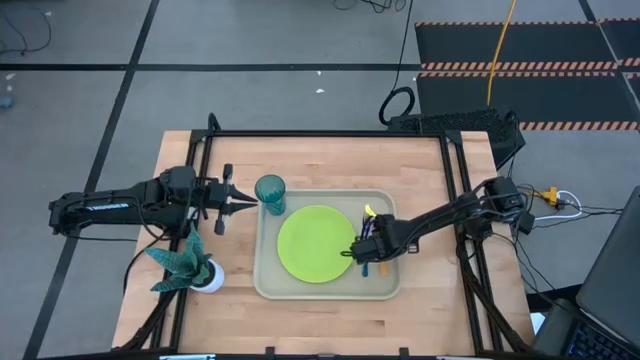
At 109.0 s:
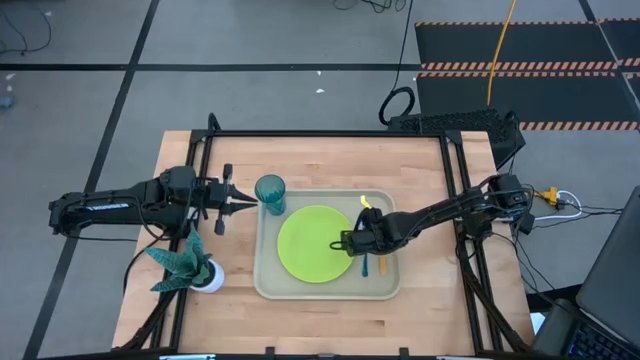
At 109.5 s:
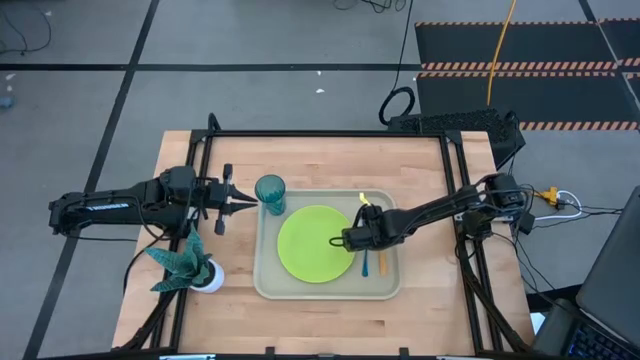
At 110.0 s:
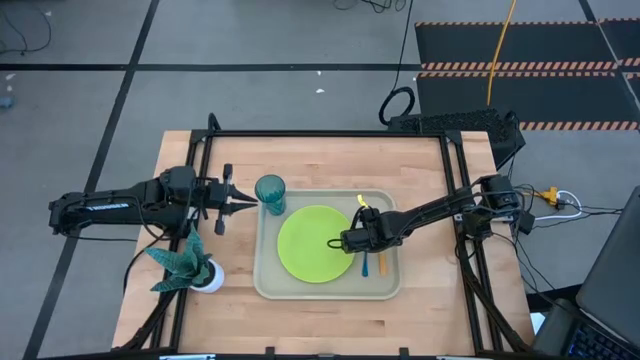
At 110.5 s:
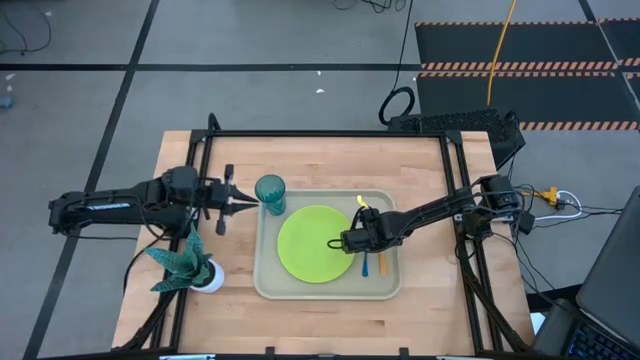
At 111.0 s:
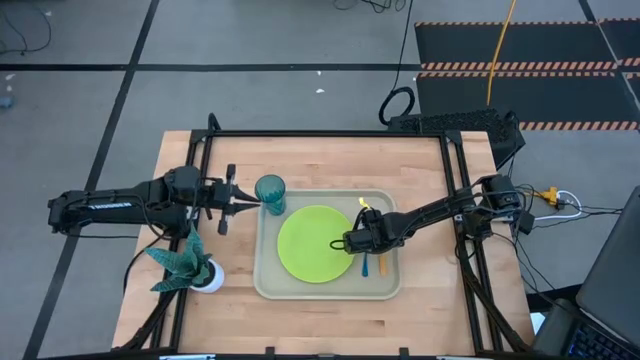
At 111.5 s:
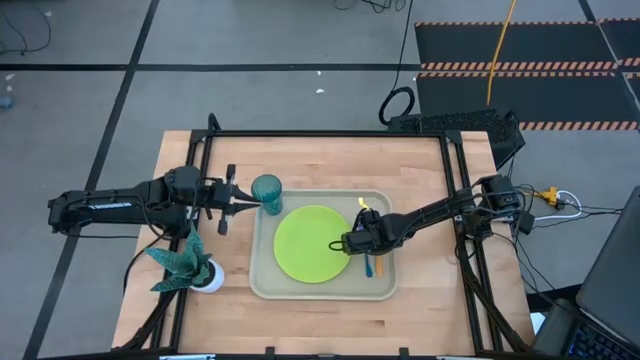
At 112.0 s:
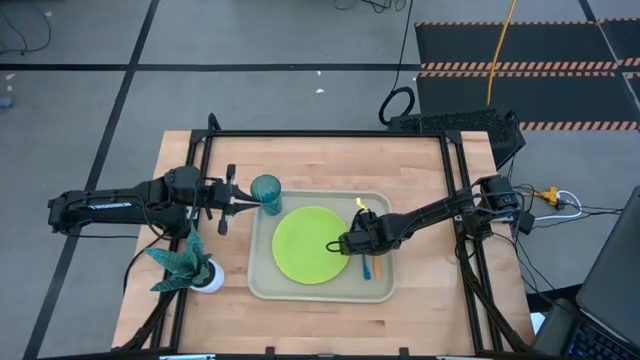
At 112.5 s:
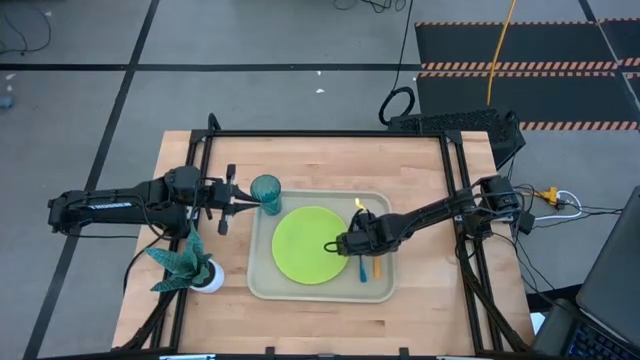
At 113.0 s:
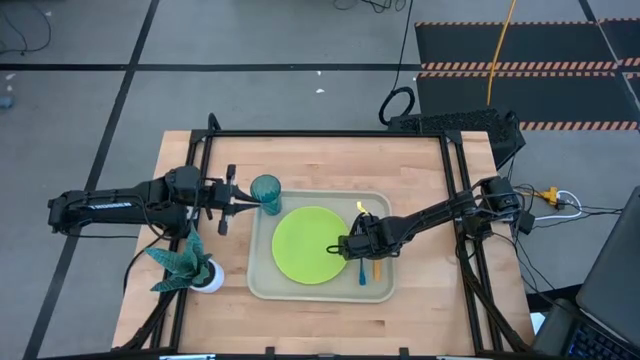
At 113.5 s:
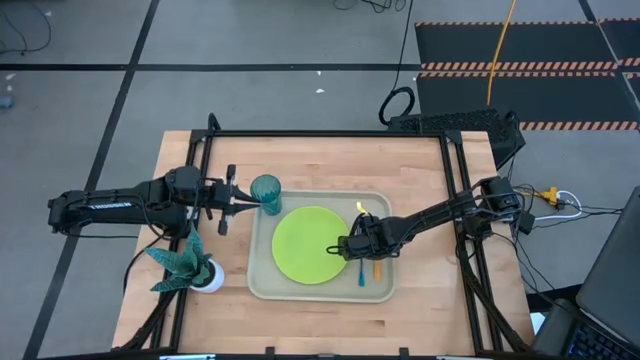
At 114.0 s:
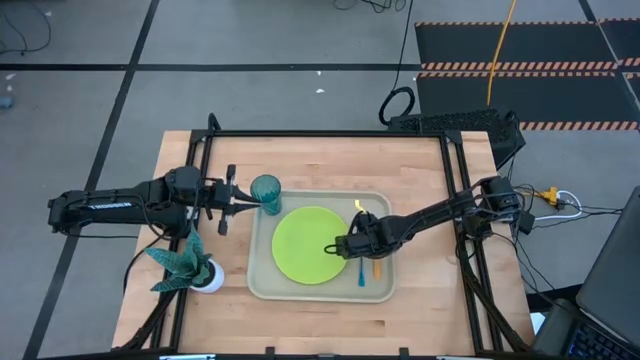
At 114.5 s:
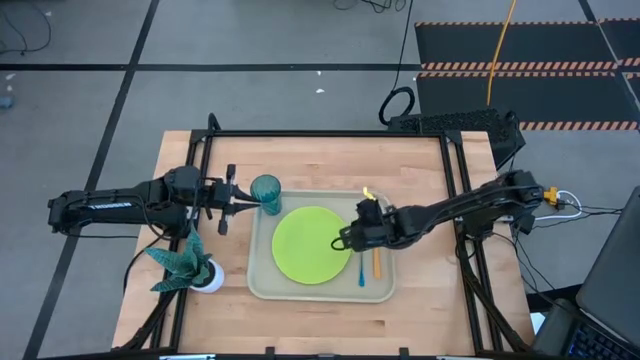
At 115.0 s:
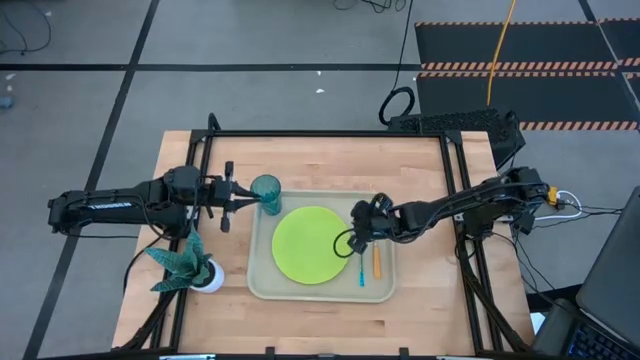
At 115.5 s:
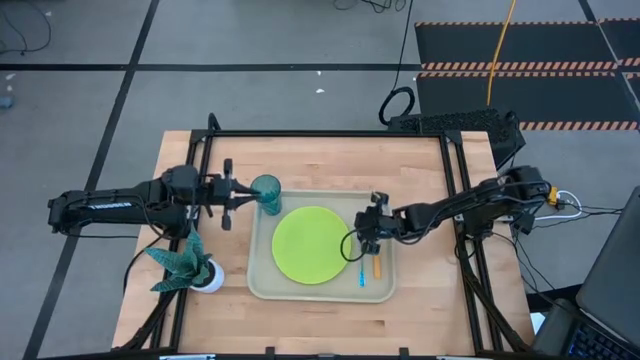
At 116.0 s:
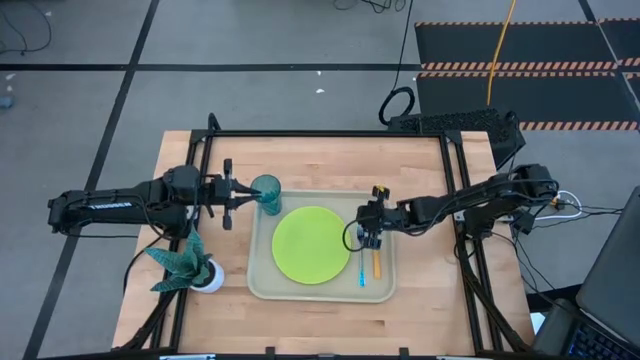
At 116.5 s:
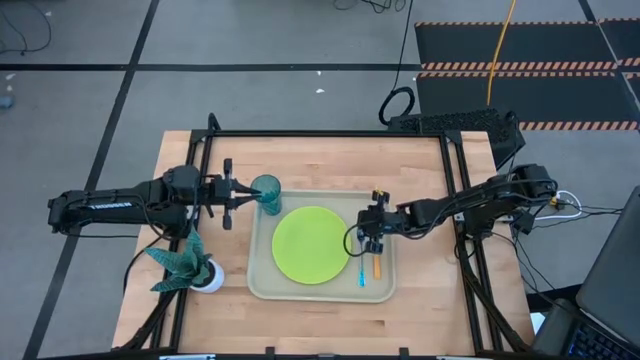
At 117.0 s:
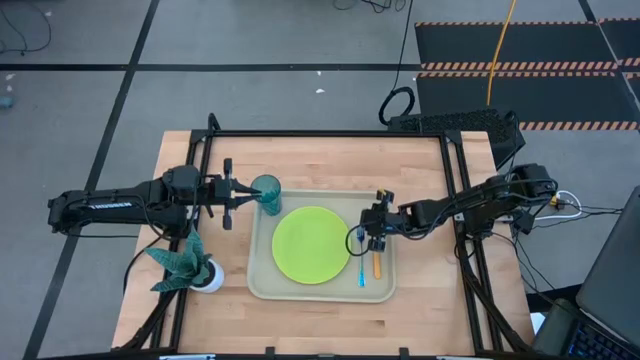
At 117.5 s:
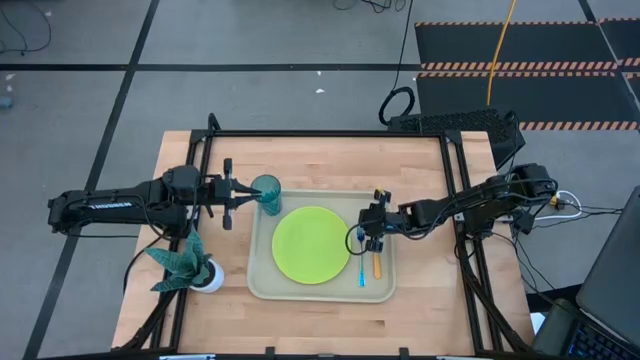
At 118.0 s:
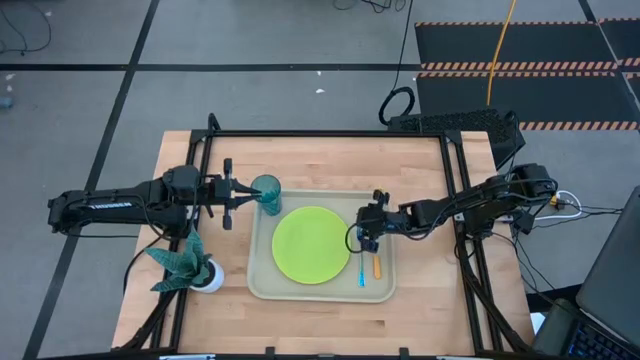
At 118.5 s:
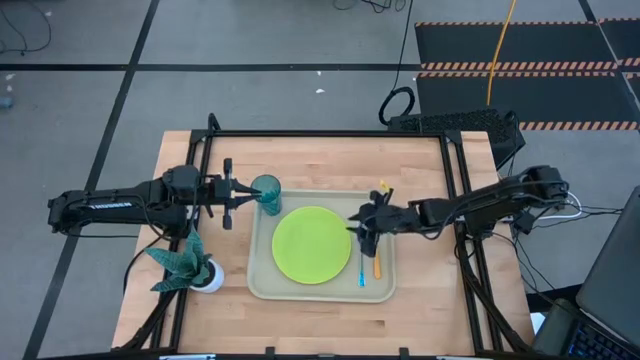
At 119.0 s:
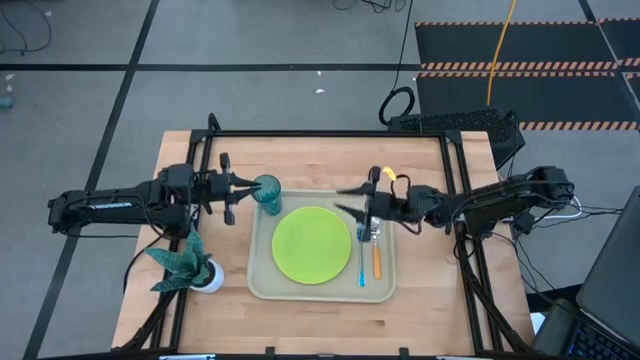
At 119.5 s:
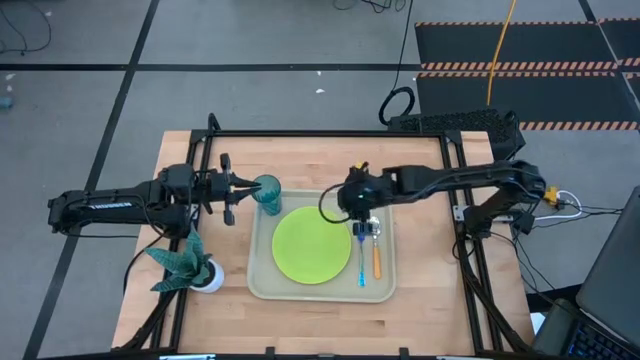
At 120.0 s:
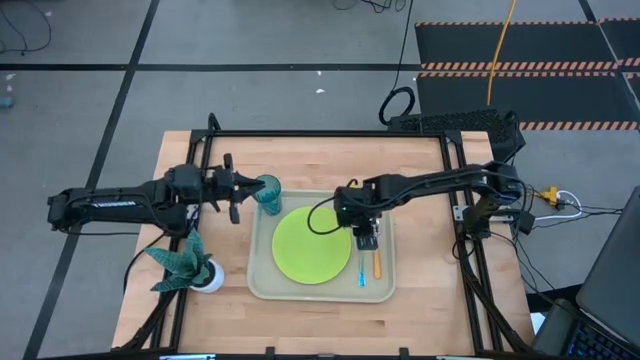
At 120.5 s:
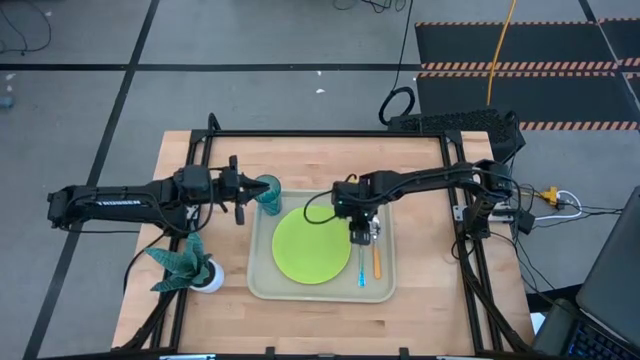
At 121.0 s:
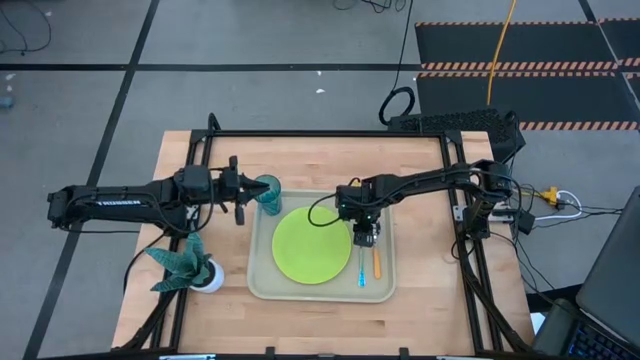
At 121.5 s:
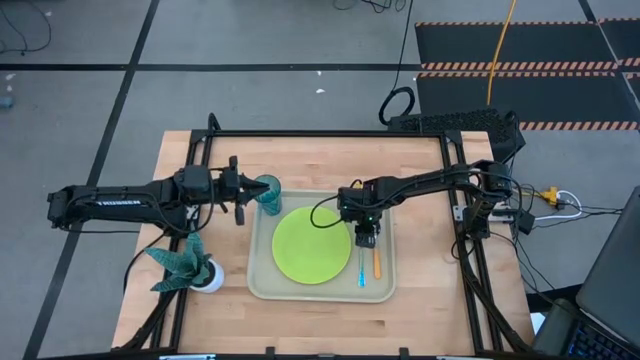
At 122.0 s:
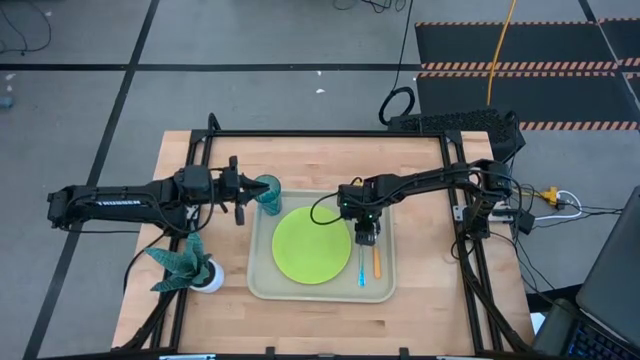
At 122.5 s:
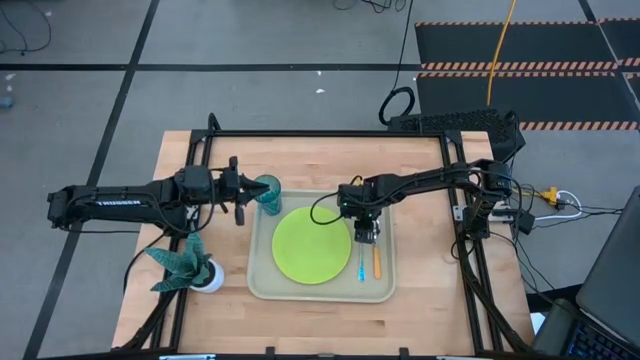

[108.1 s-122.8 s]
Task: Pick and place plate/cup/fork/spoon on tray
Adjust the iridescent fork on the gray serving tray

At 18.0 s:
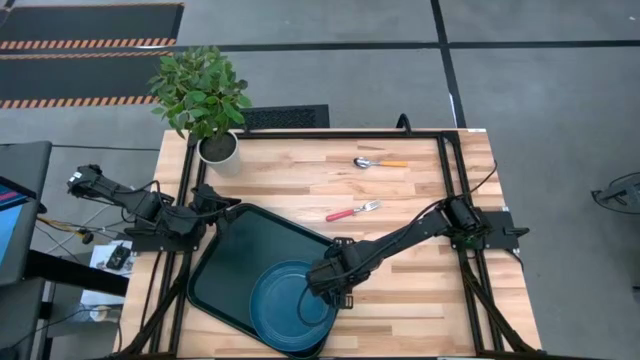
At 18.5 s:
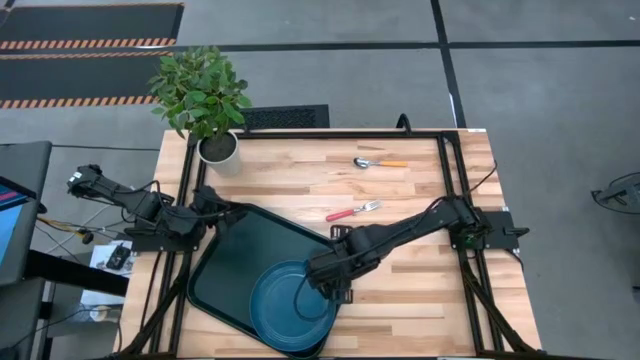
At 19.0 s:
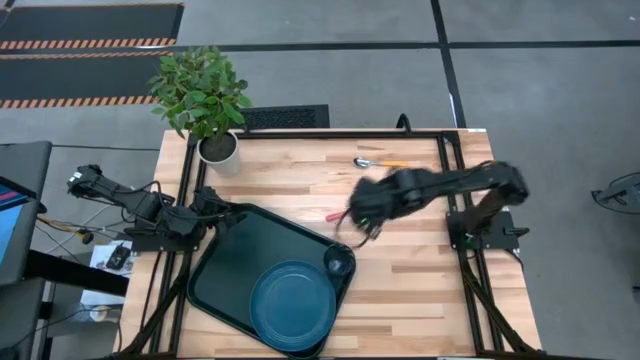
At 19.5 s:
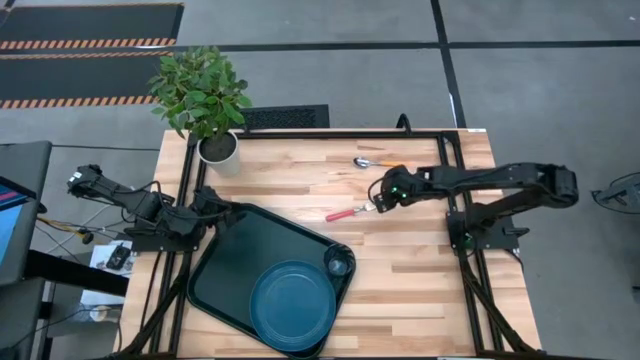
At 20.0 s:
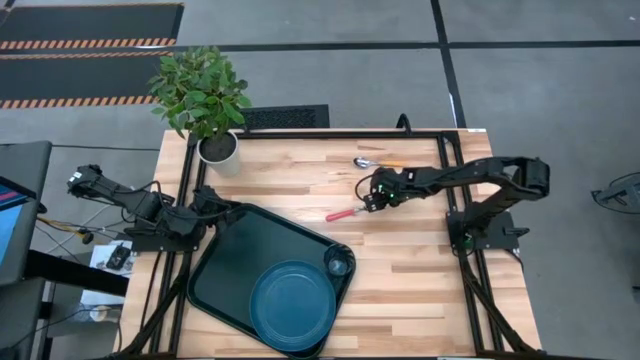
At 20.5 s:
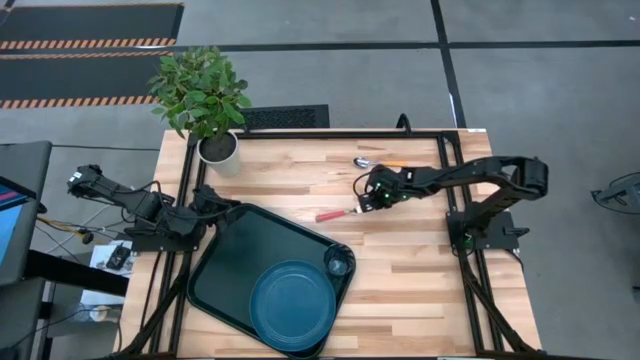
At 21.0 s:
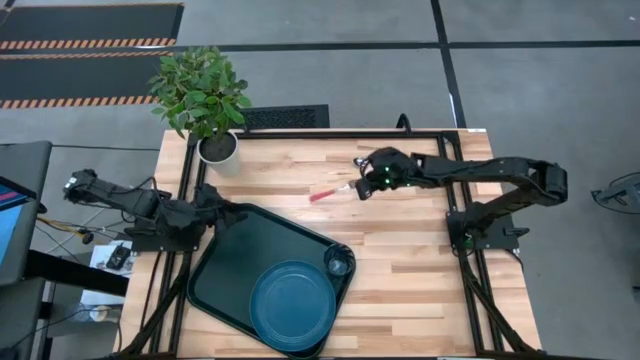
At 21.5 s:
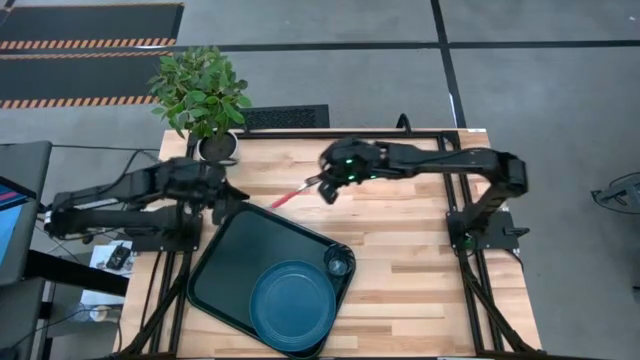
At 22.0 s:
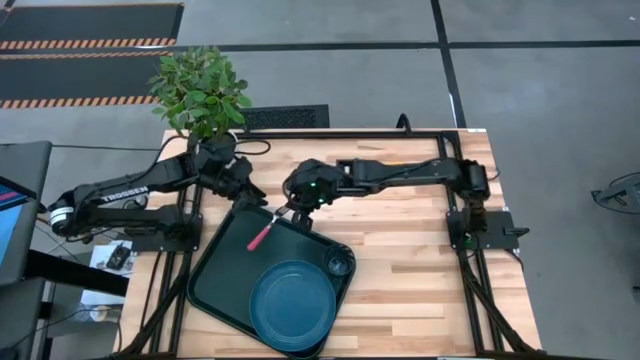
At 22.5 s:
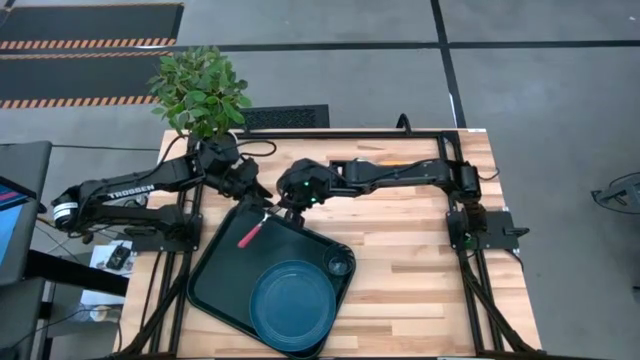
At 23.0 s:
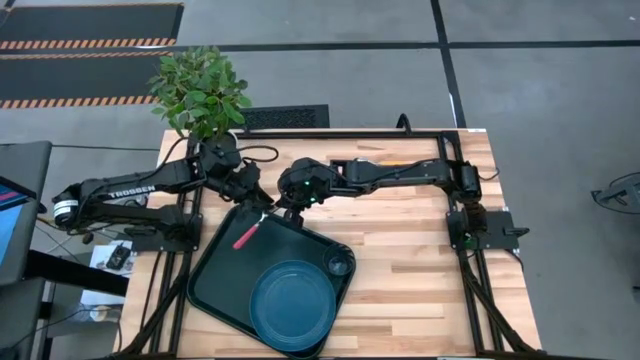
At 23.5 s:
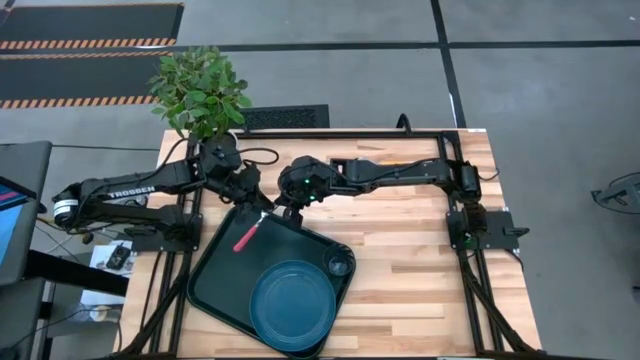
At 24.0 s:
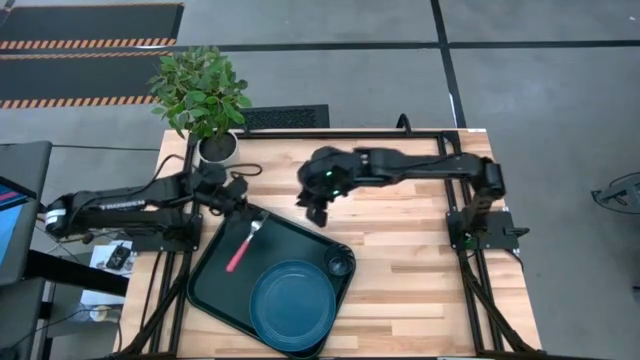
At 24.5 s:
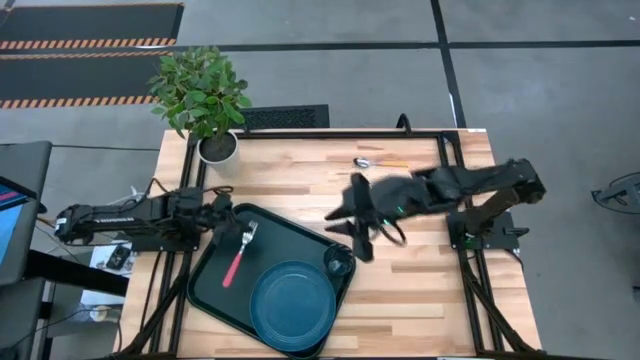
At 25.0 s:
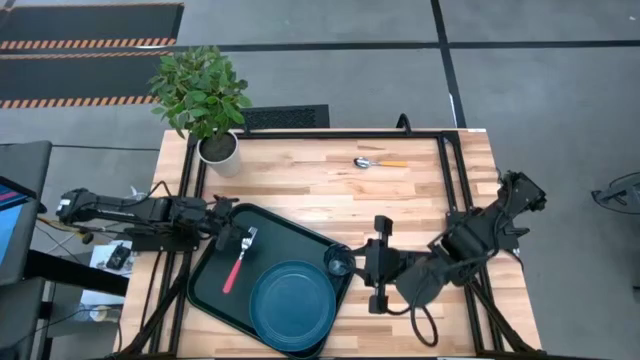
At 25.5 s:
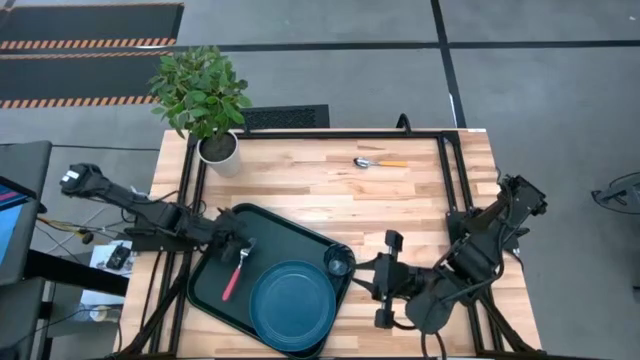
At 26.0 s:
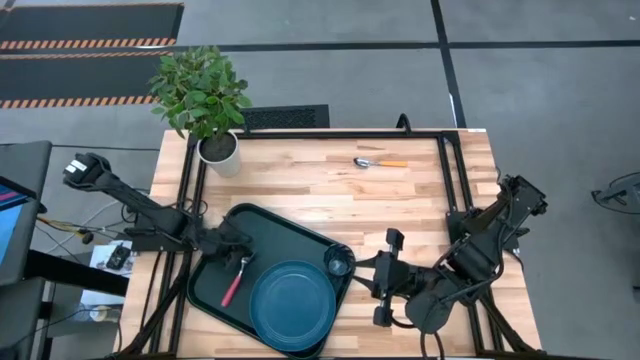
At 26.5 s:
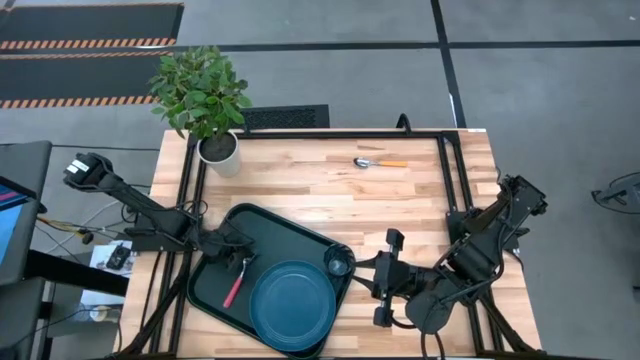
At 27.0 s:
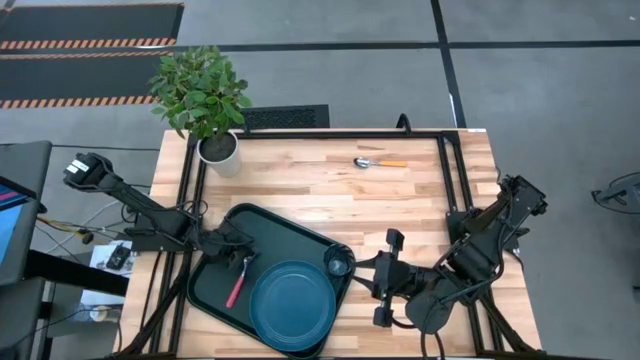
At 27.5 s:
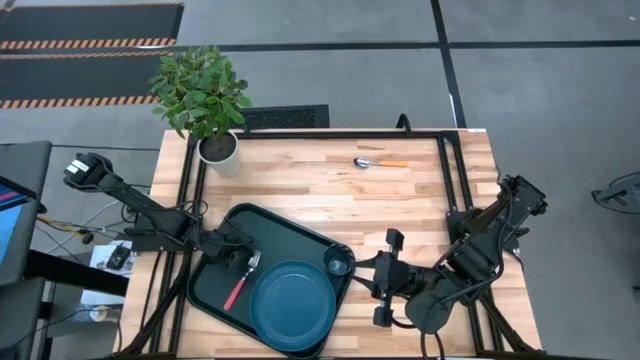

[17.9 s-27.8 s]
Task: Pick and place plate/cup/fork/spoon on tray
Put the pink fork on the black serving tray to the left of the dark blue plate
